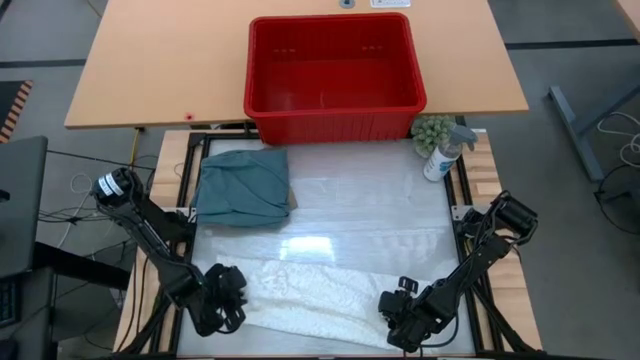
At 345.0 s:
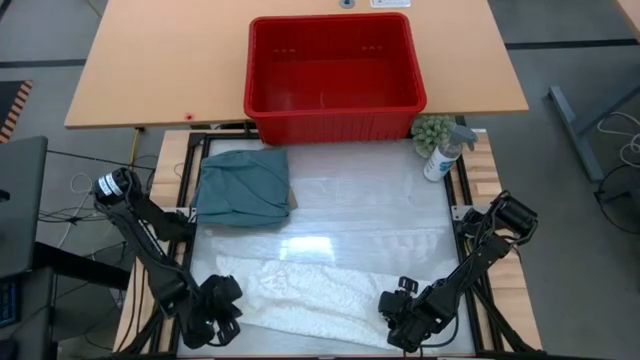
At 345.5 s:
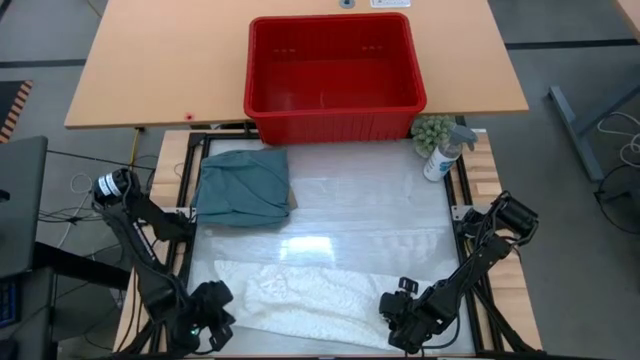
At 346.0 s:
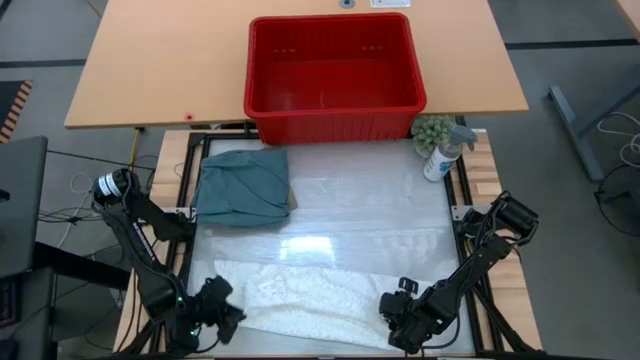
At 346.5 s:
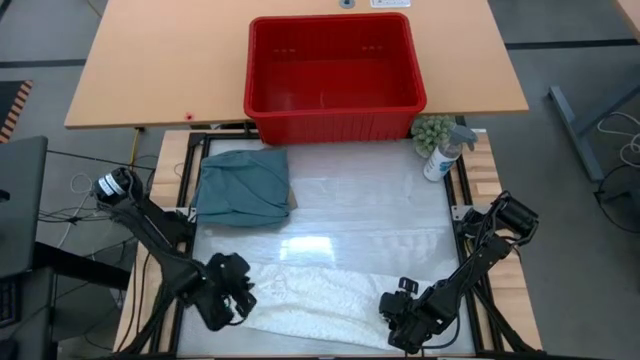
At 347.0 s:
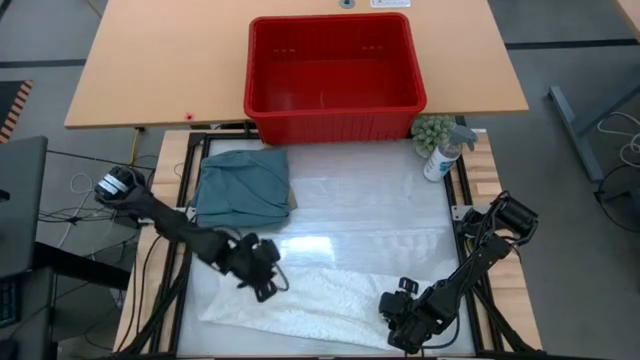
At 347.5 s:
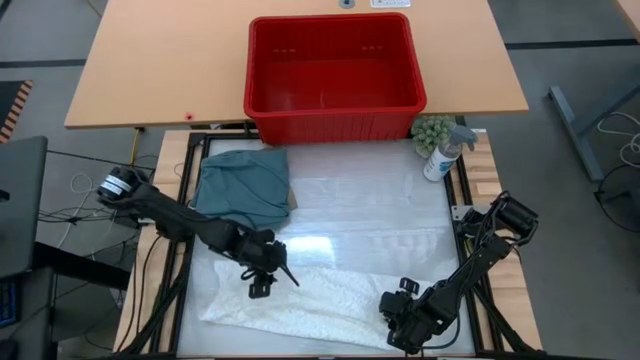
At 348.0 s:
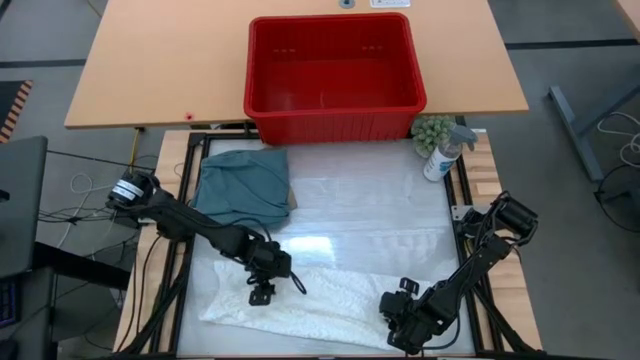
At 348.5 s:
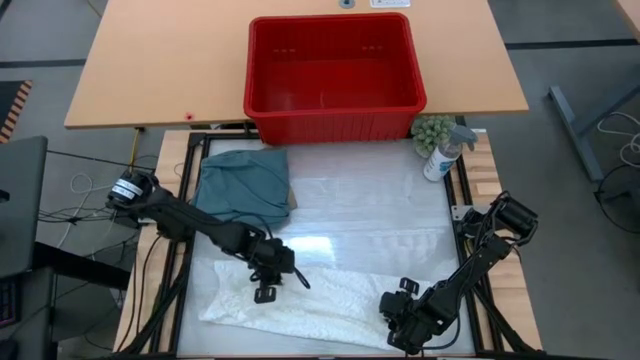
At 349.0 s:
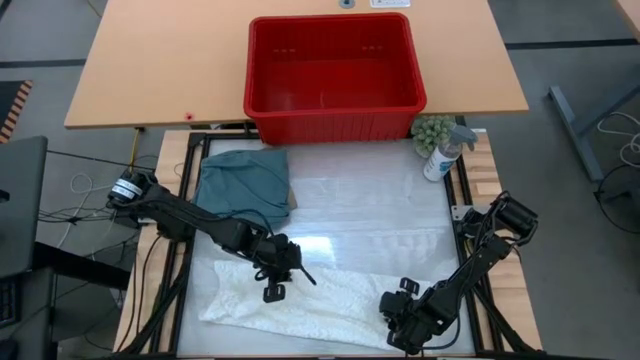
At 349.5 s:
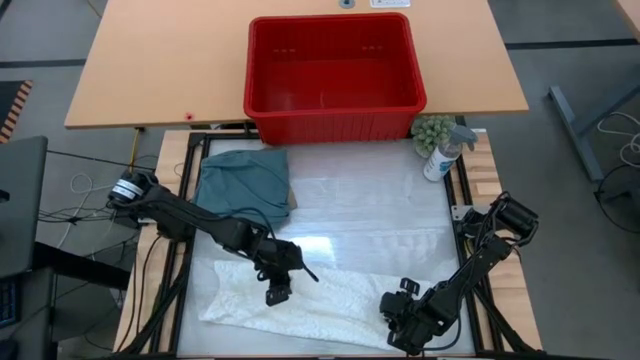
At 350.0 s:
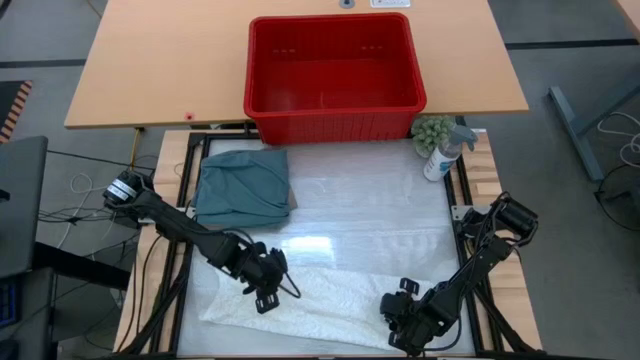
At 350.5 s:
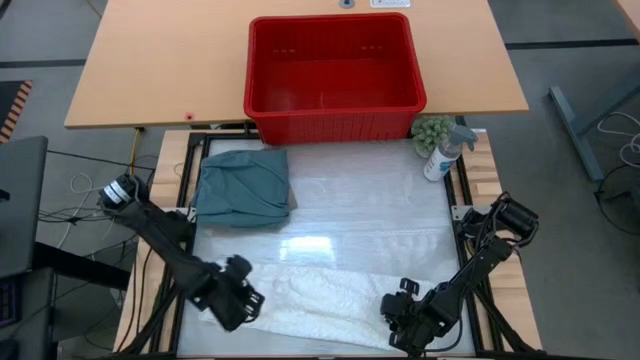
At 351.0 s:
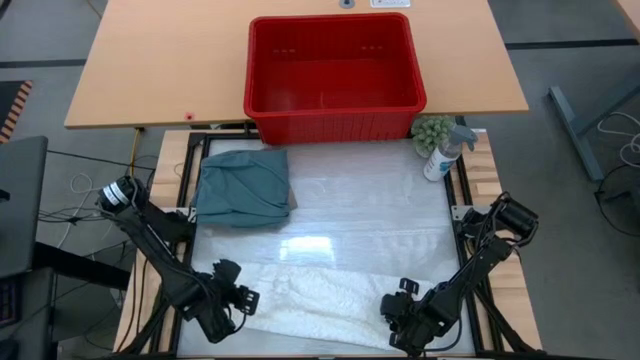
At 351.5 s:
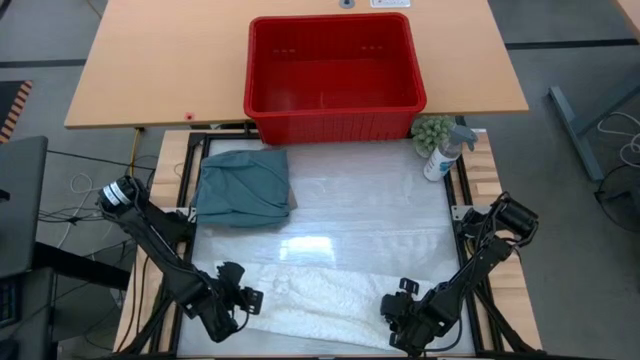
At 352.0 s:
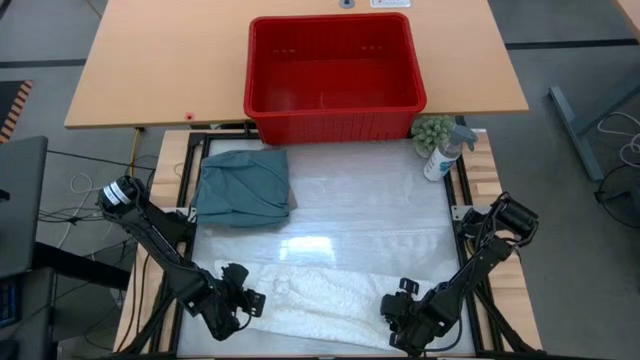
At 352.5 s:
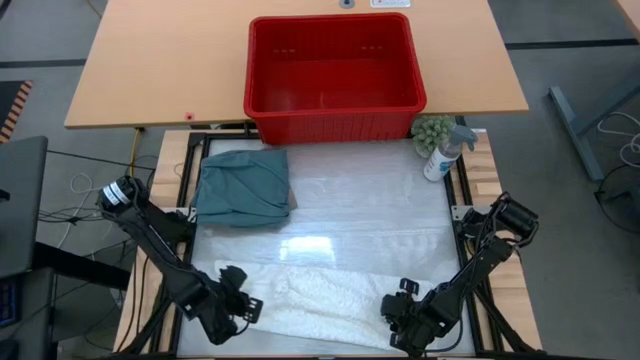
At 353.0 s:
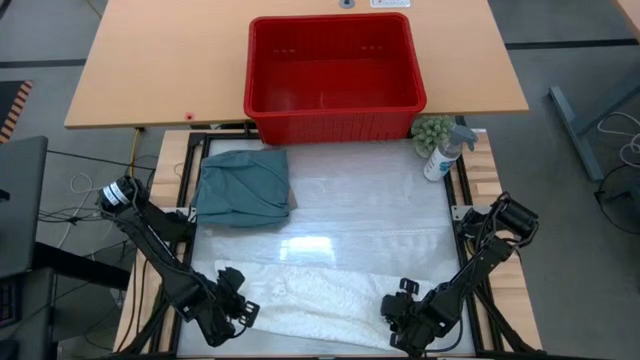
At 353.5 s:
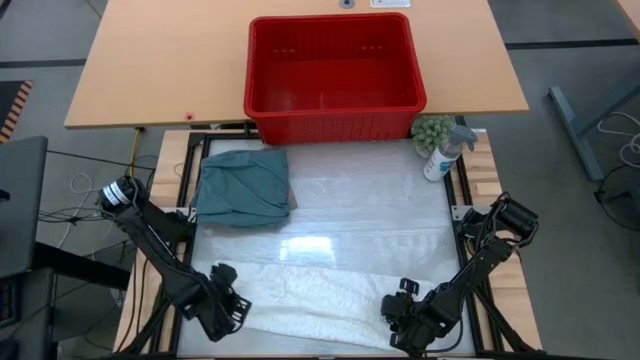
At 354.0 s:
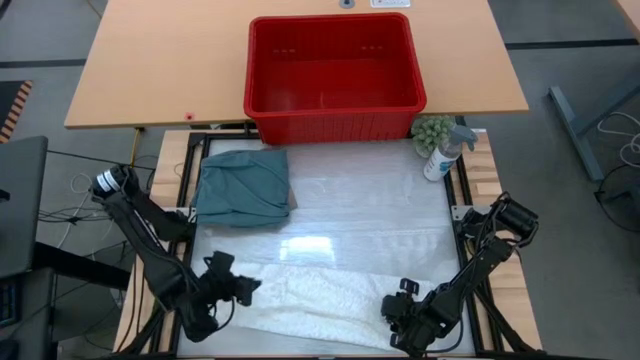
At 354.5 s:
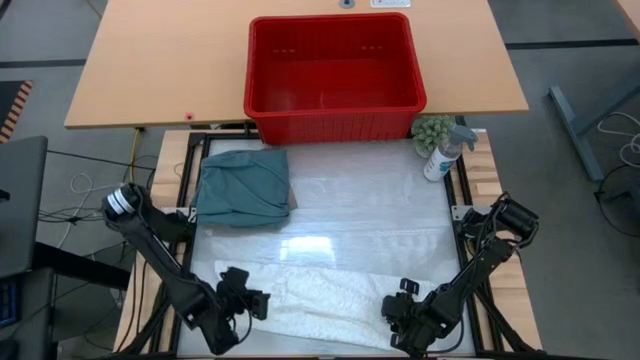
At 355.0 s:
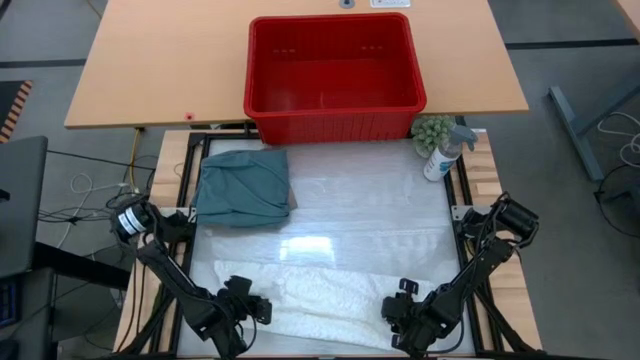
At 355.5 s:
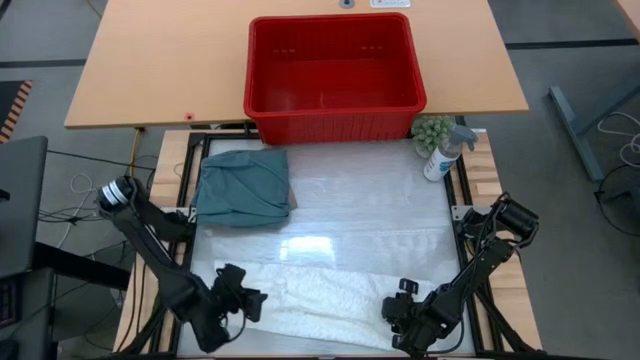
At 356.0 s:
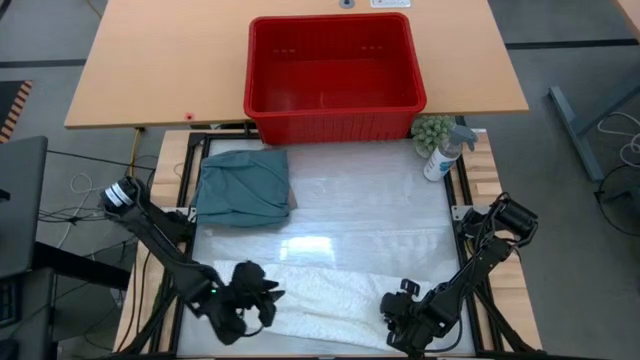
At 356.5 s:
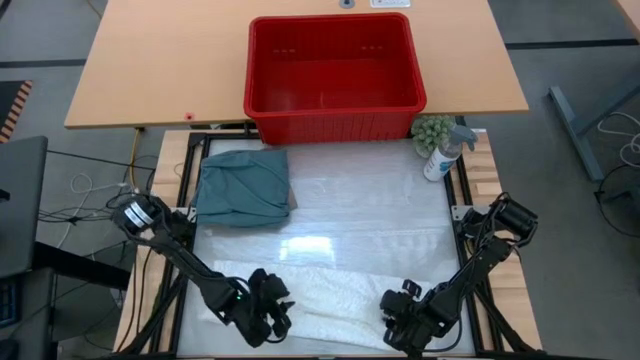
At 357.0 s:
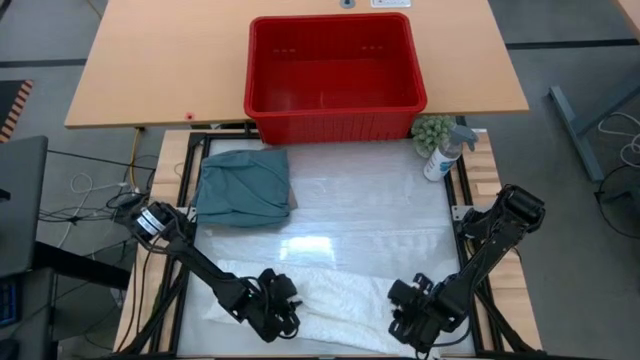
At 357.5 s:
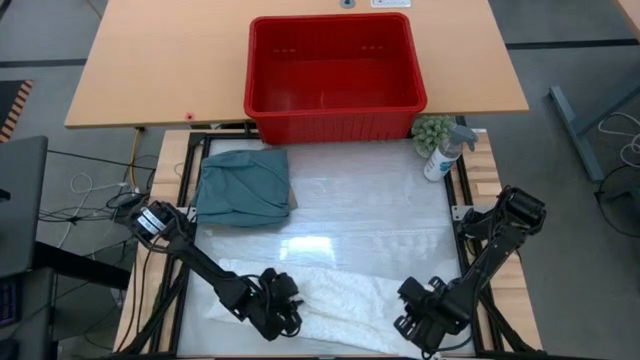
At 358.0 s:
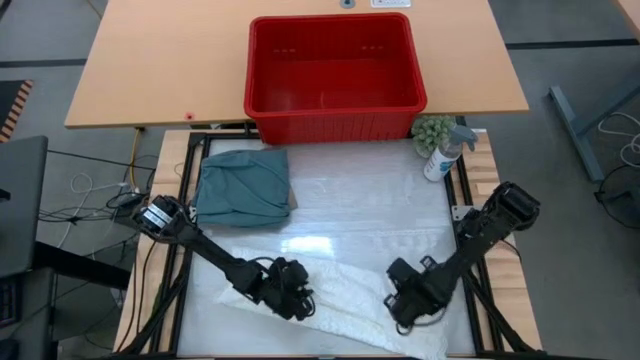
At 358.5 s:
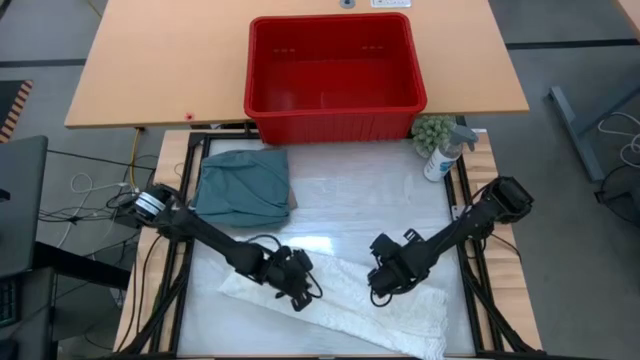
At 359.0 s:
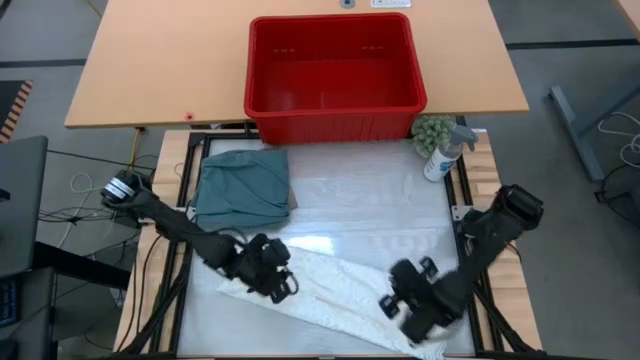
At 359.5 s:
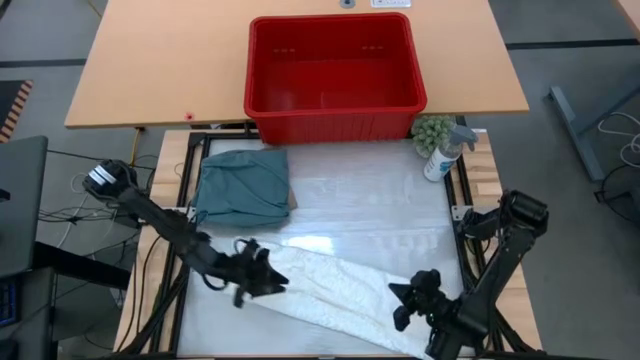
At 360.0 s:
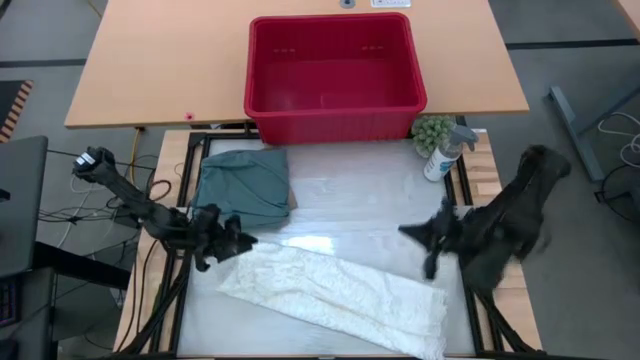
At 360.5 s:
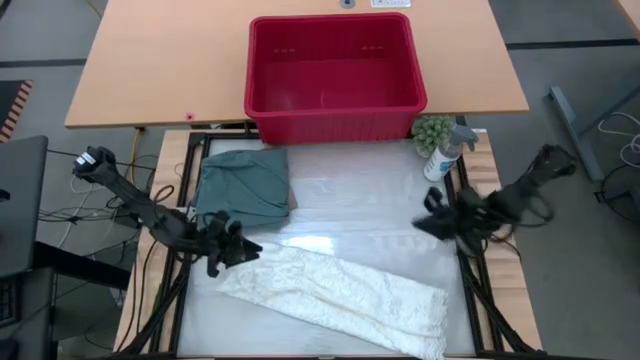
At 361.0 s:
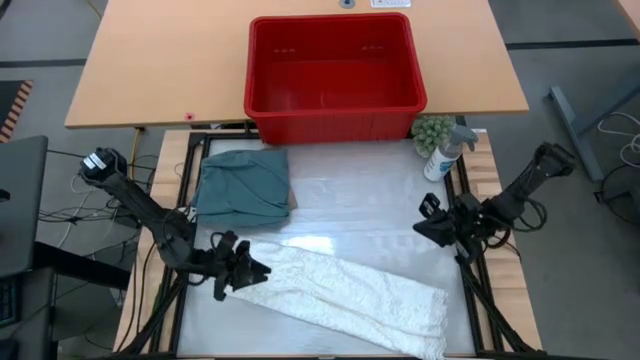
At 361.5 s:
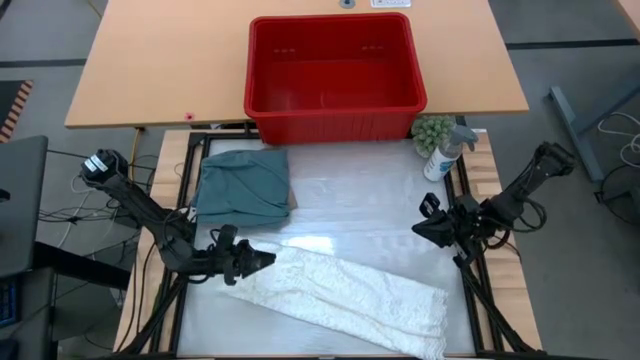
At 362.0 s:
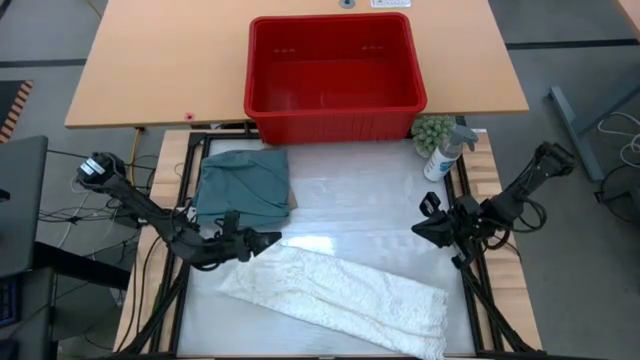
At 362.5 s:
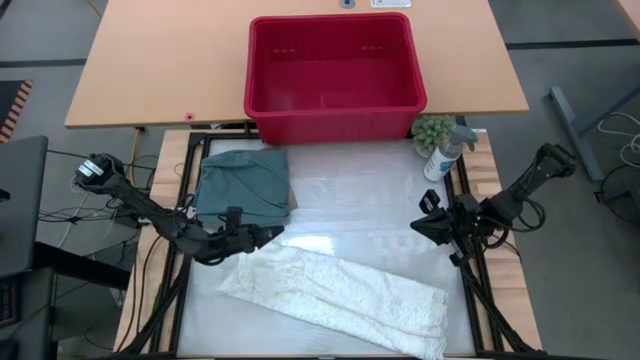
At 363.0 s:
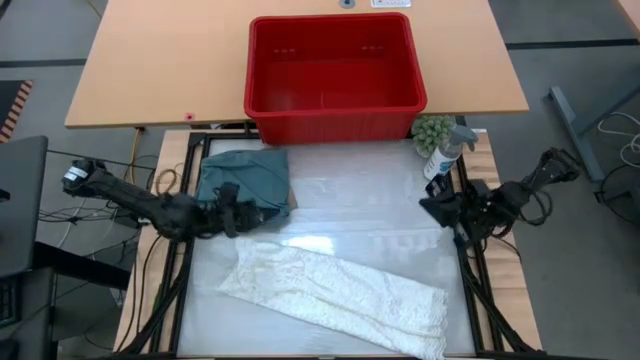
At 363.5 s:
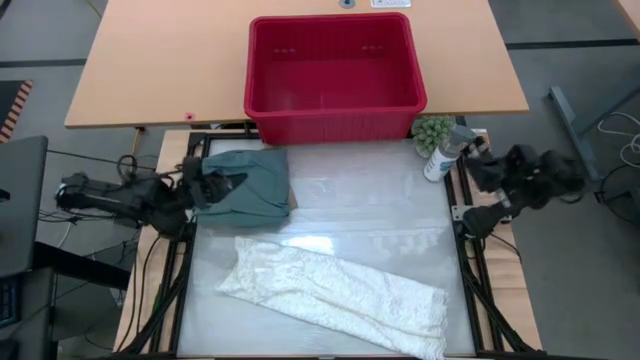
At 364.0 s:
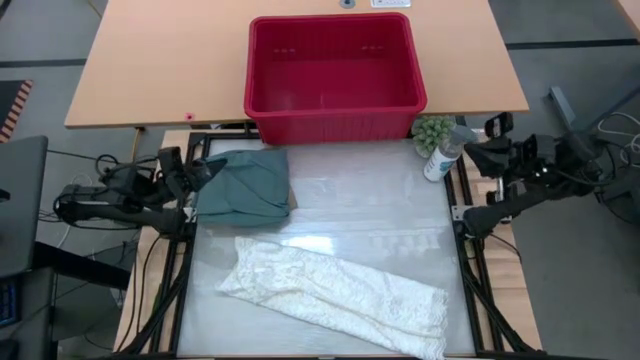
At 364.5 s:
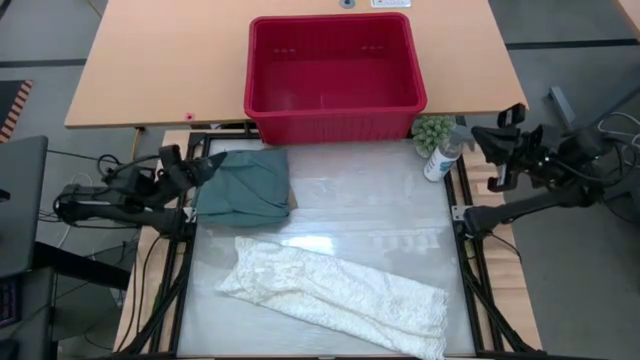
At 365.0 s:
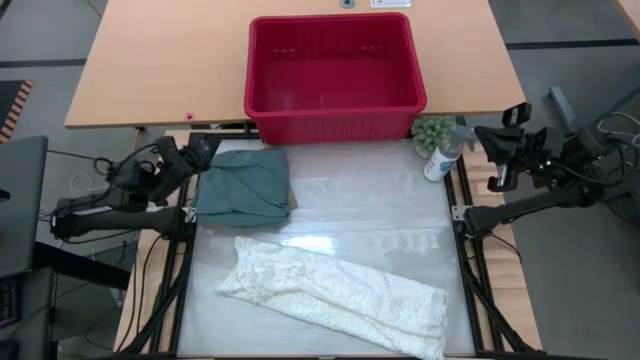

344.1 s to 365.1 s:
Task: Fold Laundry from Bin
Fold the white shirt in the red bin
